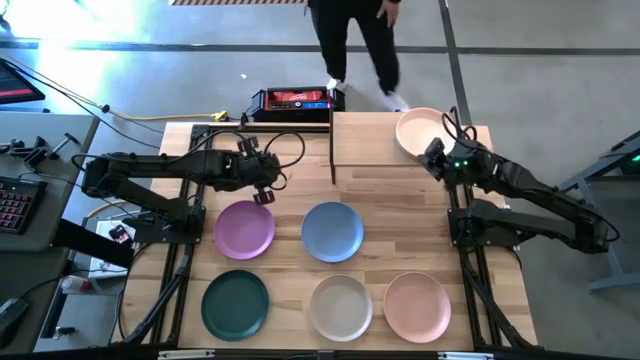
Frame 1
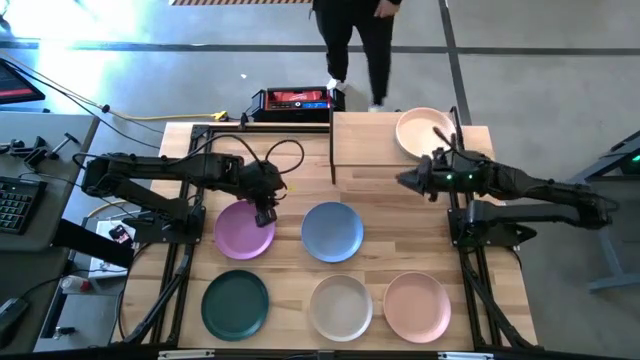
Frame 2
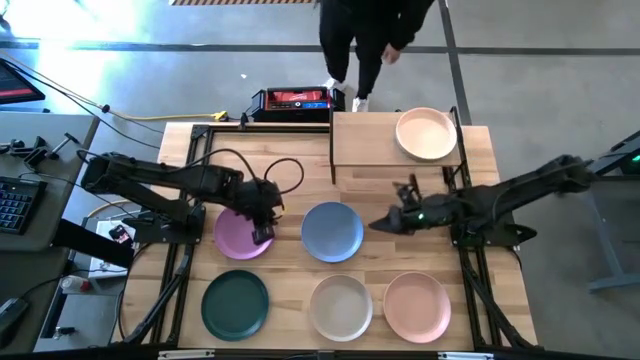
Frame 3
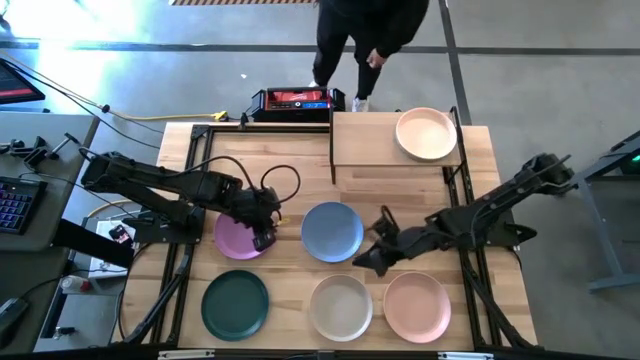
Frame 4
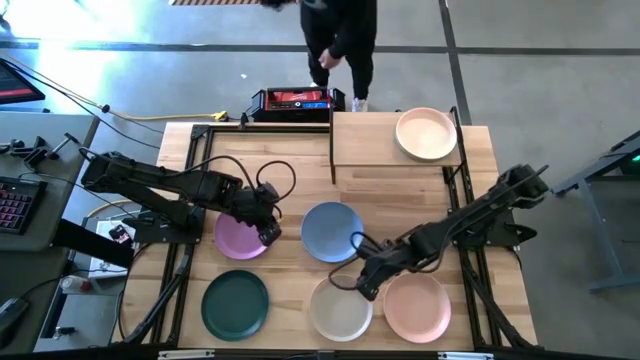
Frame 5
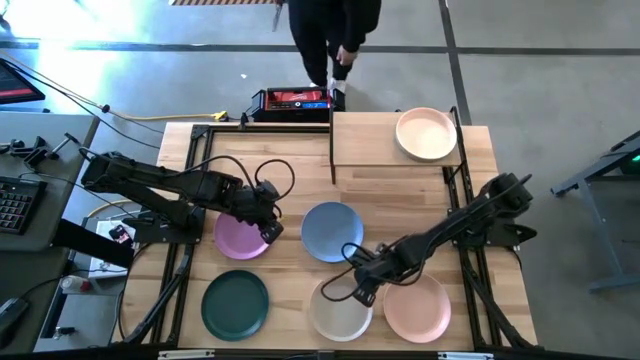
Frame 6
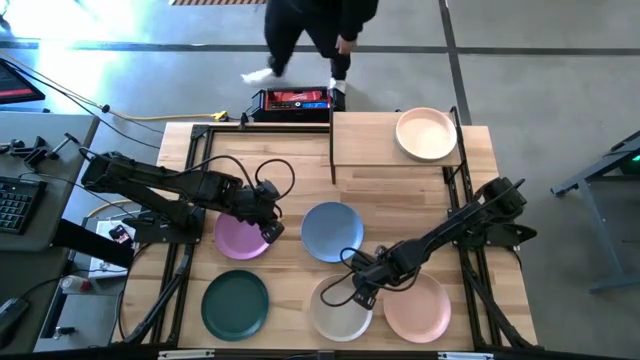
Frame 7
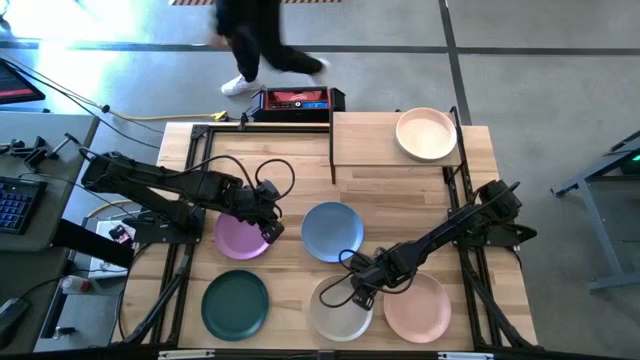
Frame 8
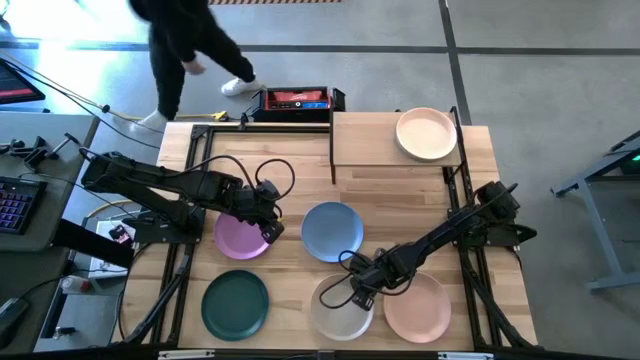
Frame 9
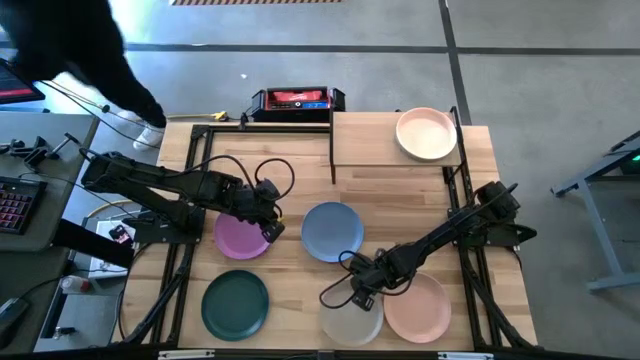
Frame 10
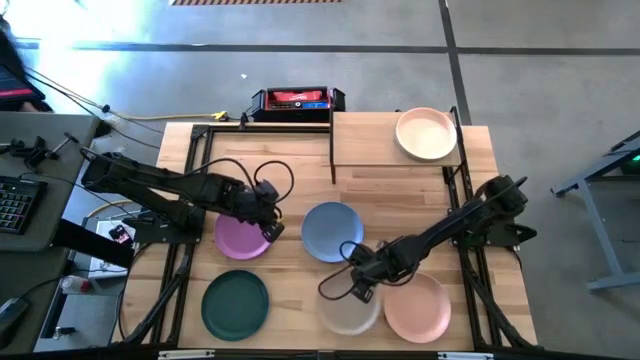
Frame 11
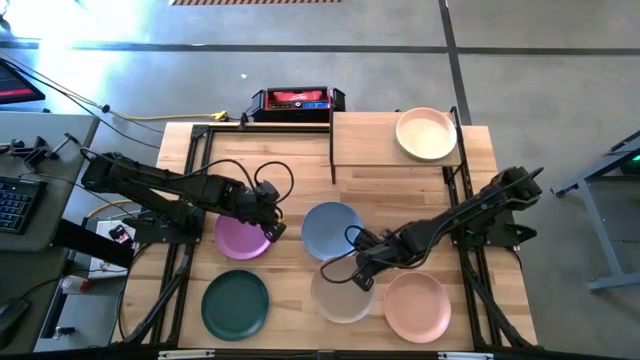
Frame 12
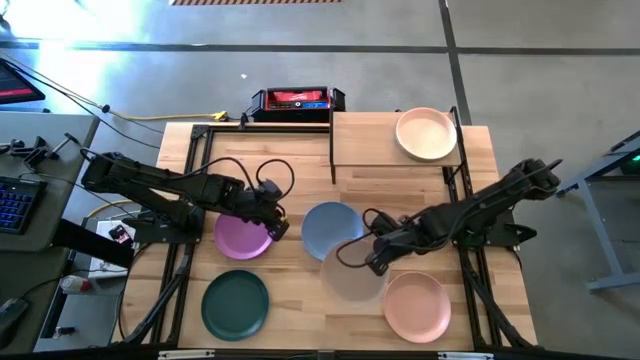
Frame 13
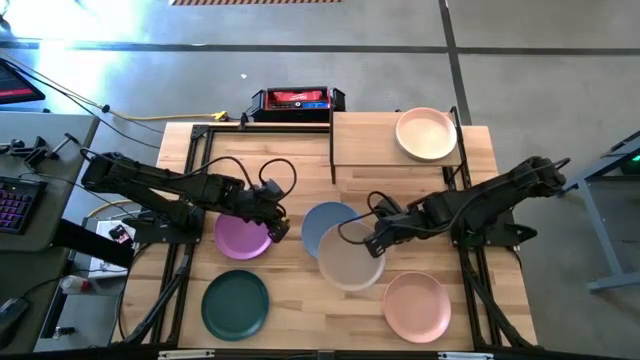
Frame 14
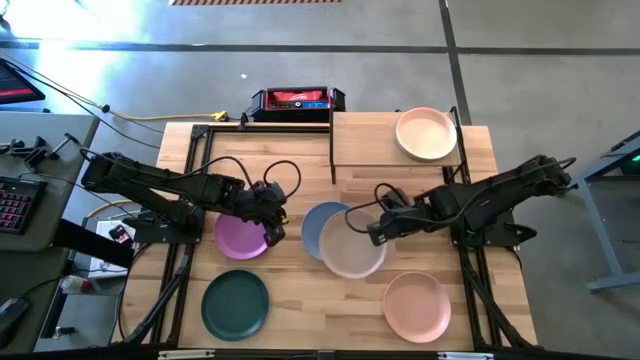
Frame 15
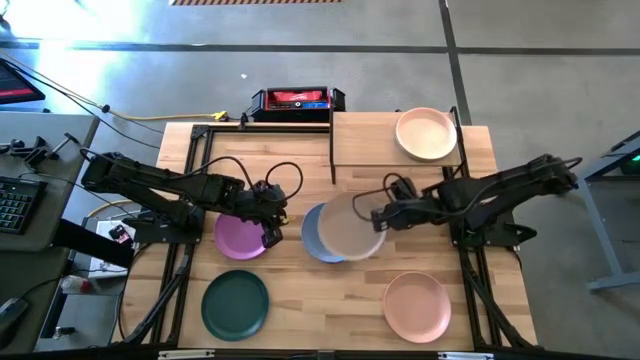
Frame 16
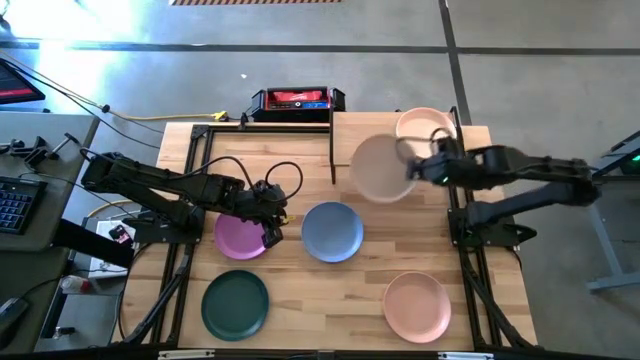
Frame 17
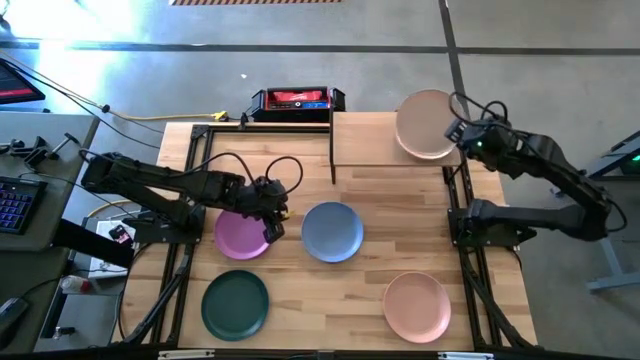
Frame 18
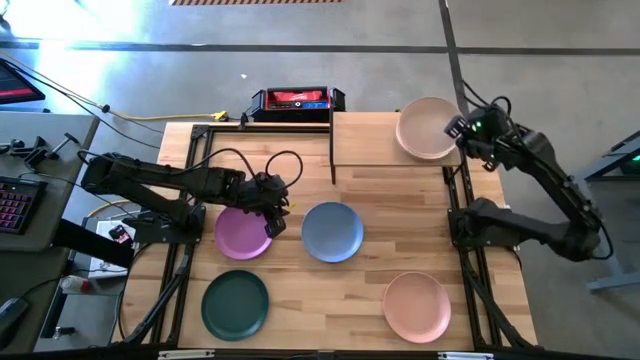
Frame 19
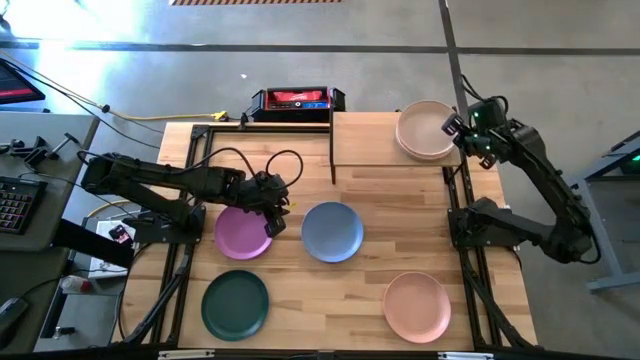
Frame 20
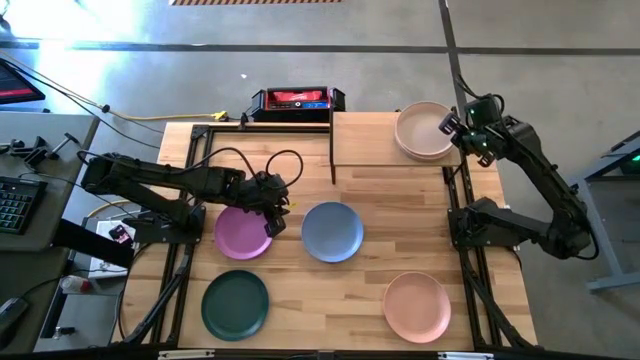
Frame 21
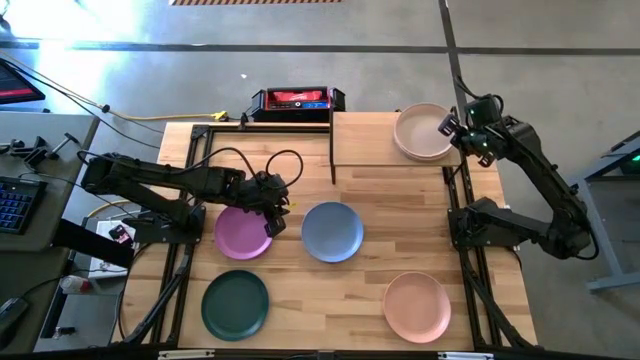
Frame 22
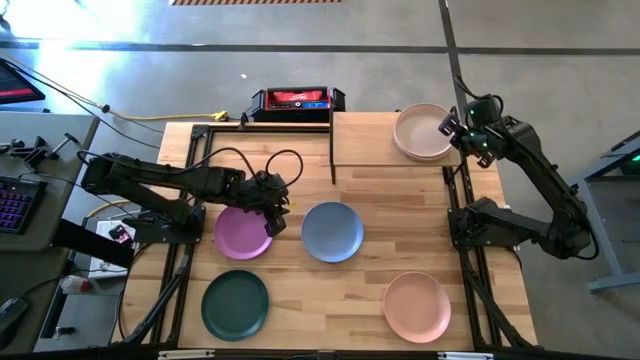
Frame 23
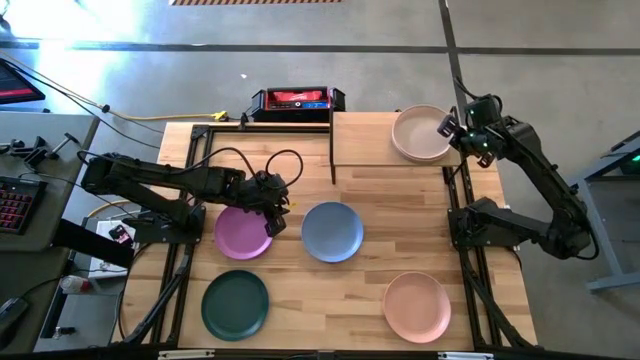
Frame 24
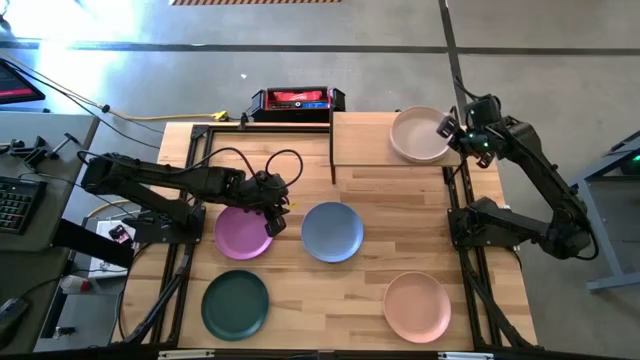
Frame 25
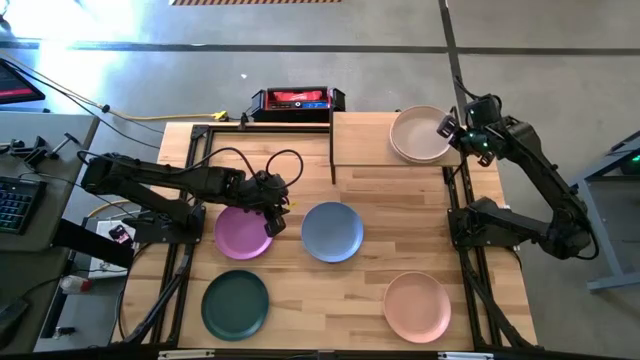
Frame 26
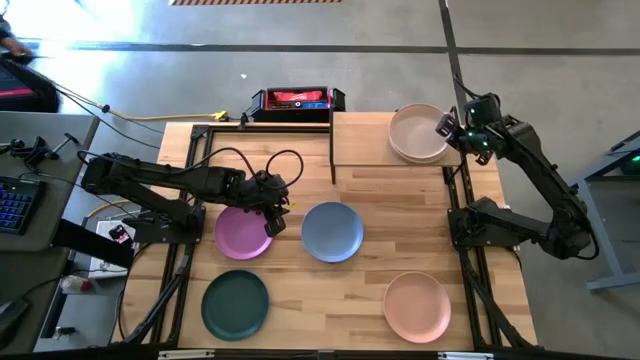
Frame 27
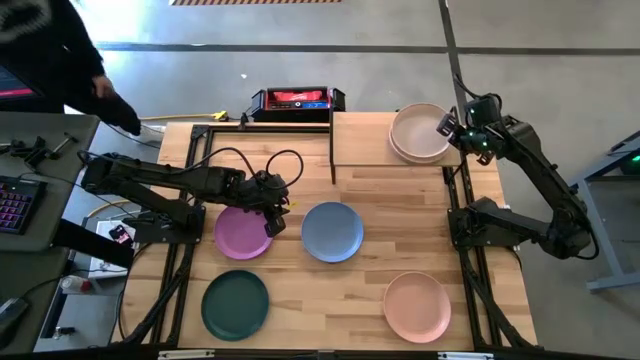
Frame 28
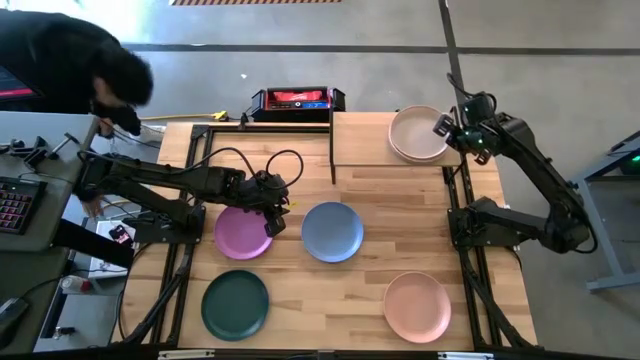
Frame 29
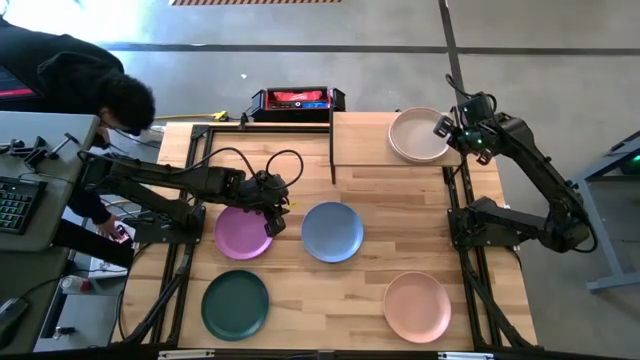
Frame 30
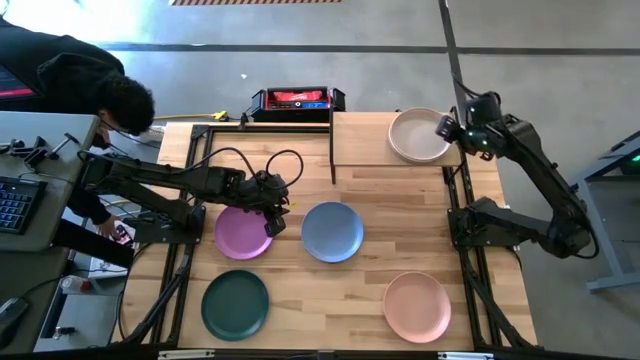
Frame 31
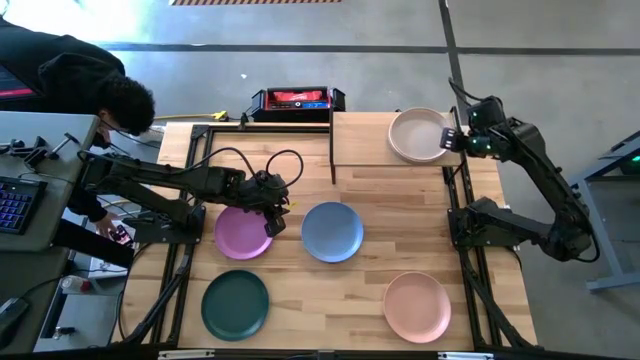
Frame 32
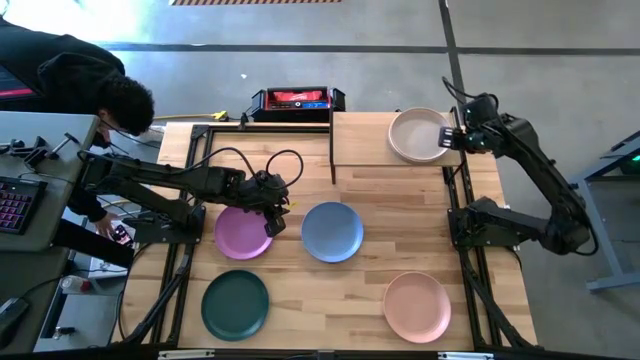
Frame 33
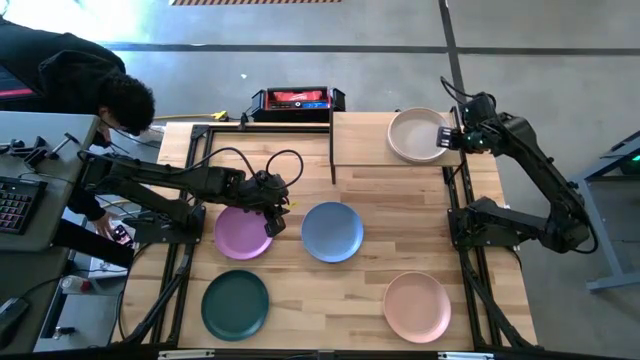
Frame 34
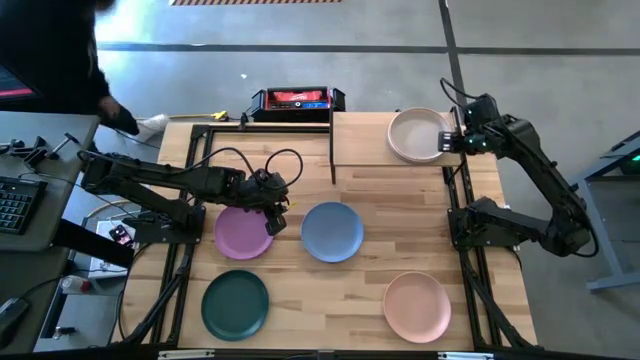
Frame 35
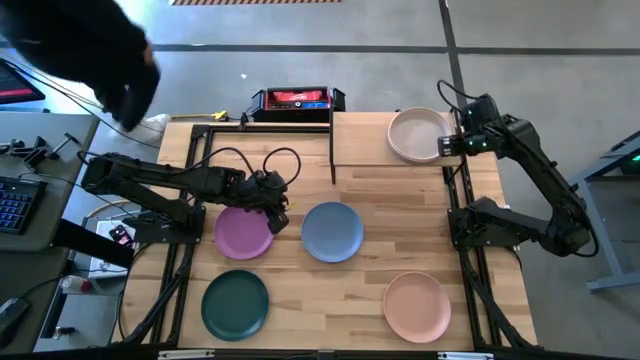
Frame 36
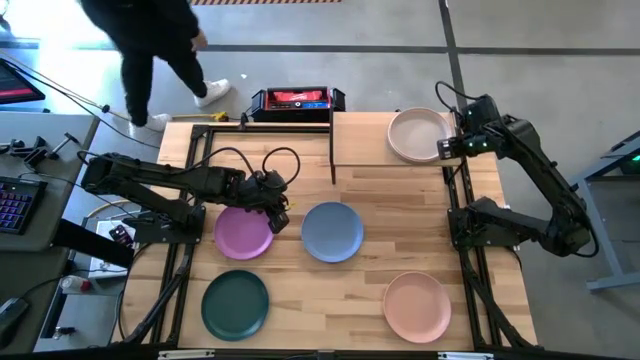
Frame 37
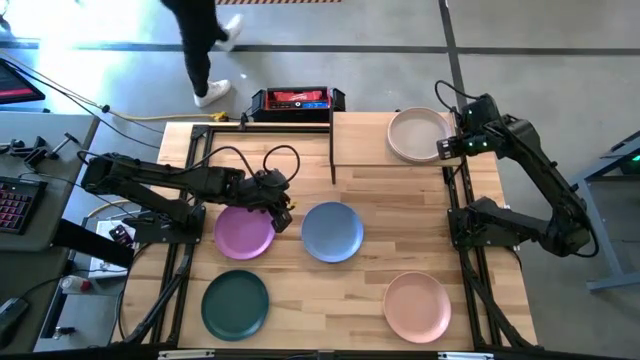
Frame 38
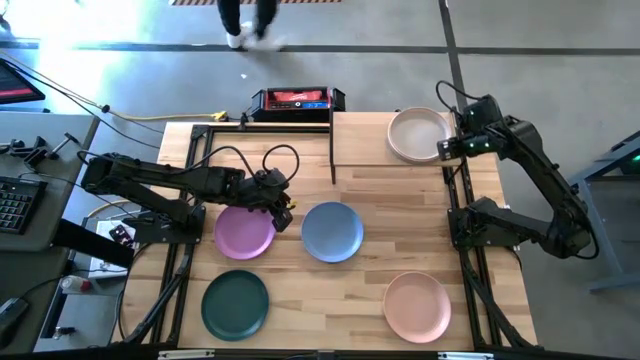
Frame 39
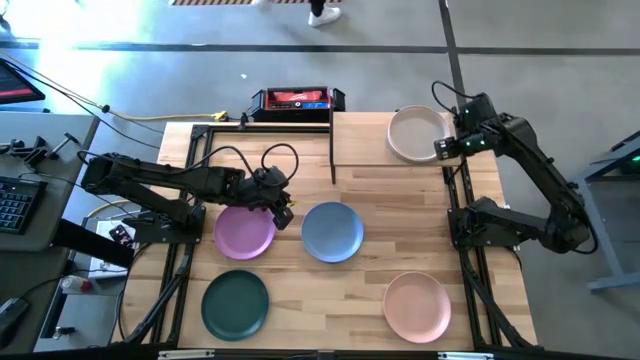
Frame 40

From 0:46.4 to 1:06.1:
Task: Place and stack plates onto a shelf
Stack the light gray plate on top of the light orange stacked plates on the shelf

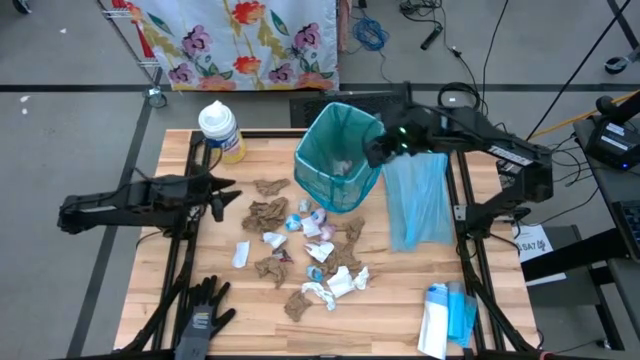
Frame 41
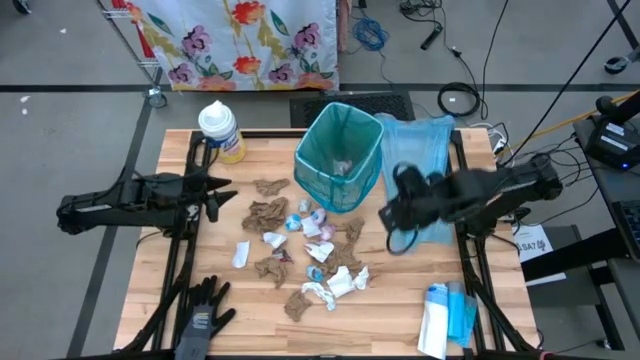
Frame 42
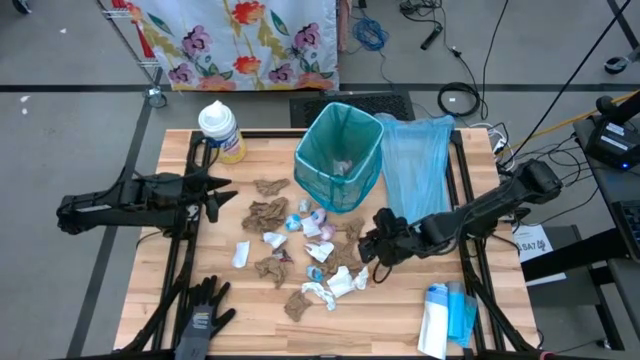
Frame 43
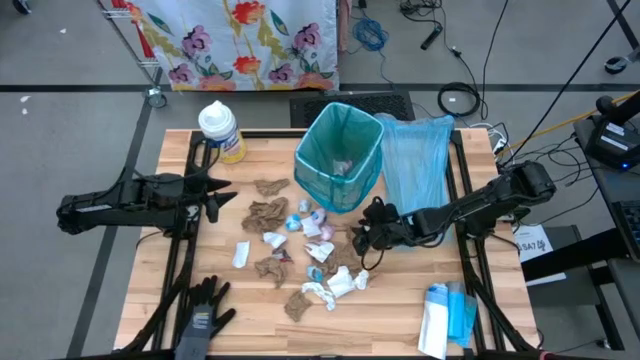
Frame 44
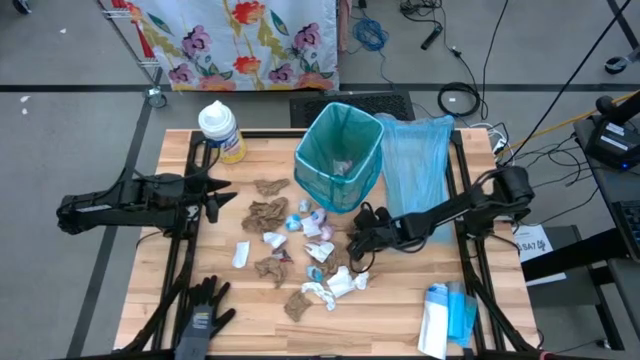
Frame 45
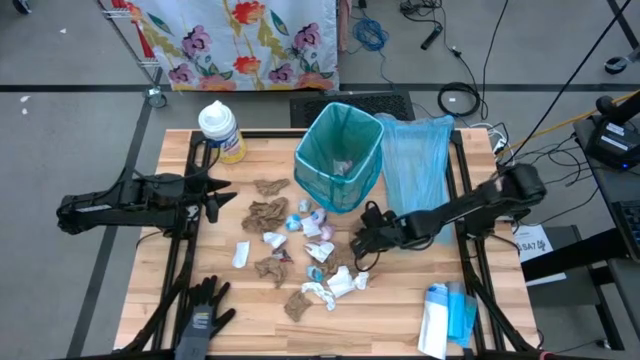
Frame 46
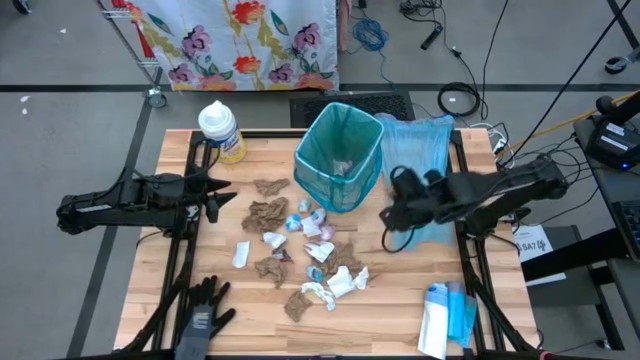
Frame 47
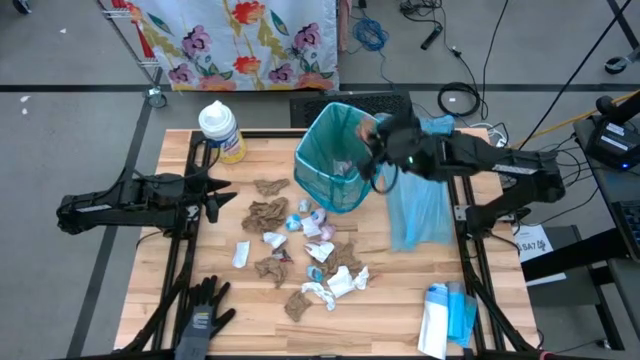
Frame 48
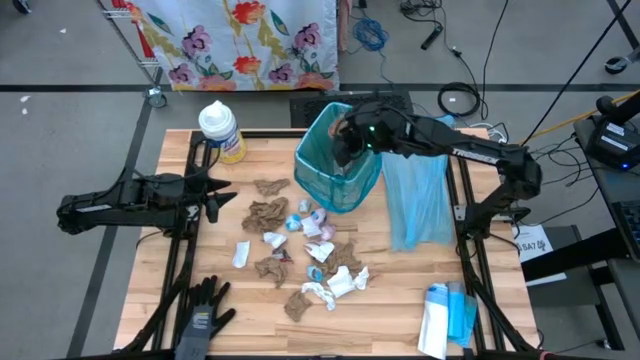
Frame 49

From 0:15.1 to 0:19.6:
Task: place trash/remove bag and relplace
Put the brown napkin into the trash bin
